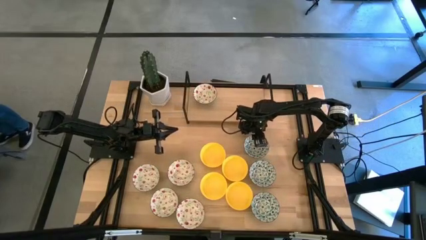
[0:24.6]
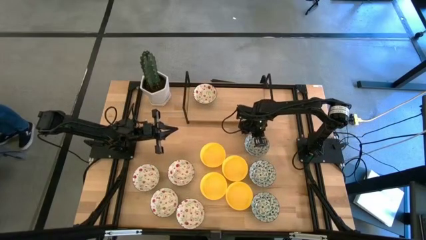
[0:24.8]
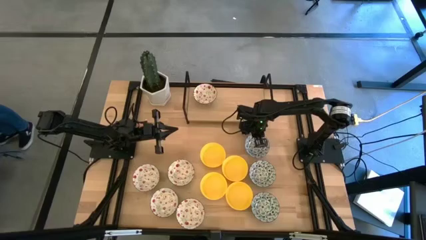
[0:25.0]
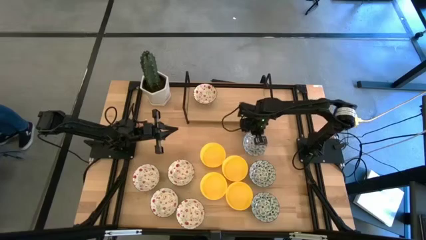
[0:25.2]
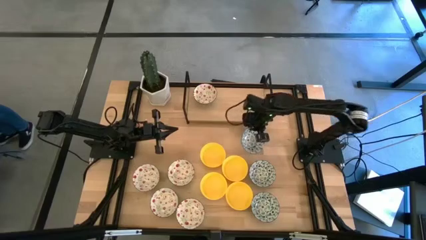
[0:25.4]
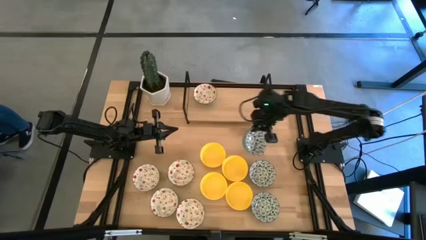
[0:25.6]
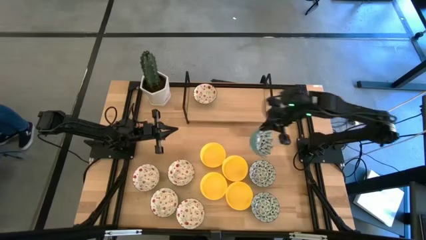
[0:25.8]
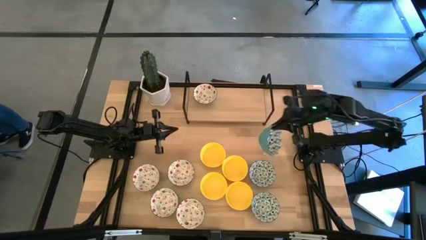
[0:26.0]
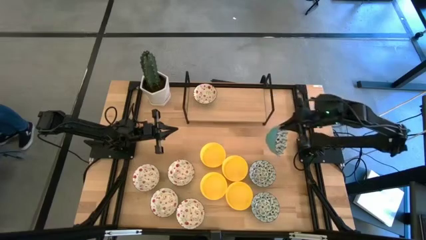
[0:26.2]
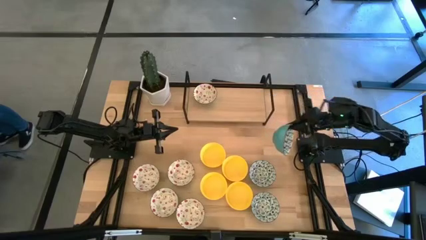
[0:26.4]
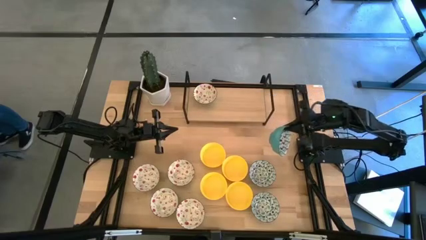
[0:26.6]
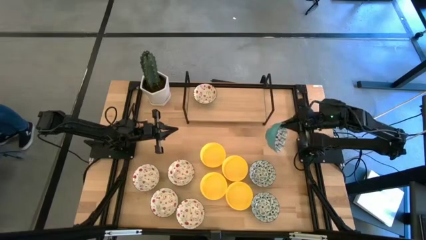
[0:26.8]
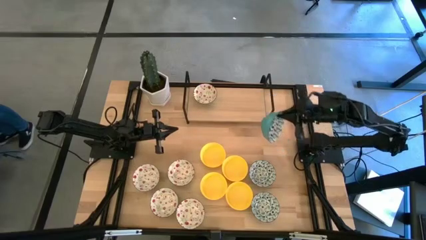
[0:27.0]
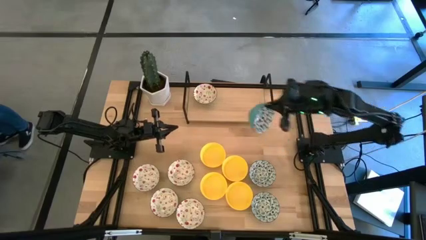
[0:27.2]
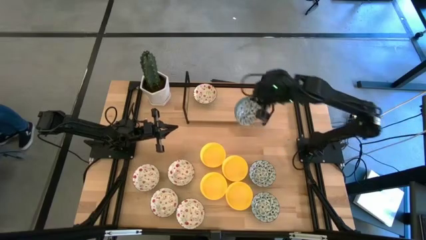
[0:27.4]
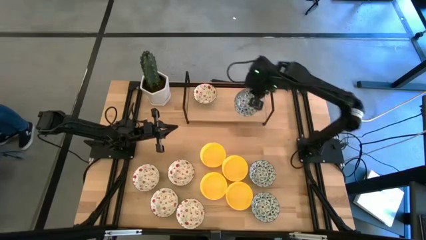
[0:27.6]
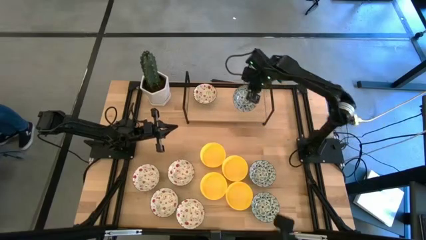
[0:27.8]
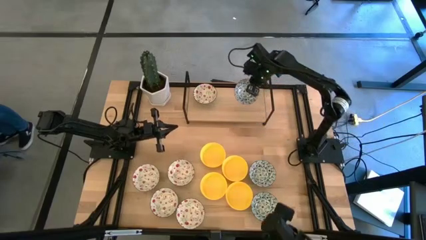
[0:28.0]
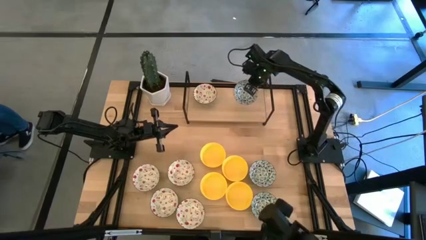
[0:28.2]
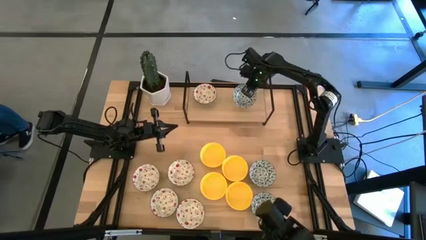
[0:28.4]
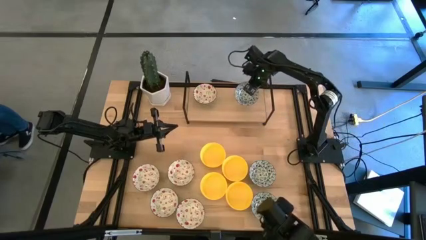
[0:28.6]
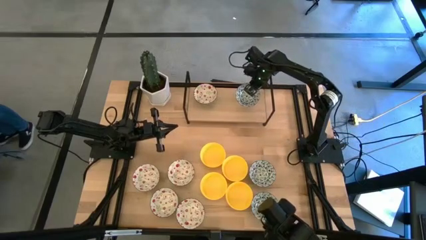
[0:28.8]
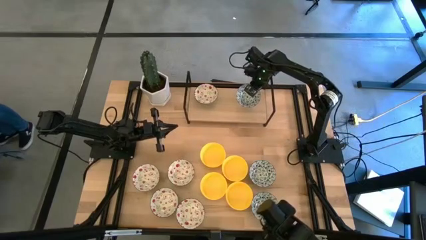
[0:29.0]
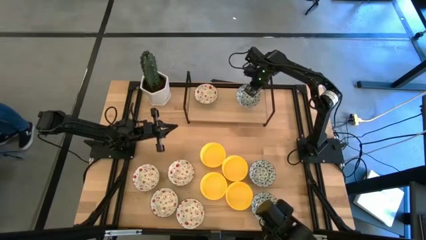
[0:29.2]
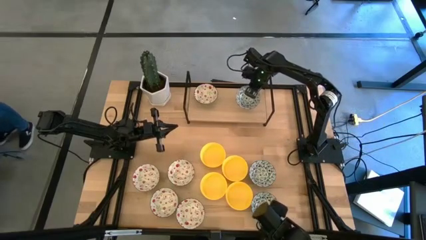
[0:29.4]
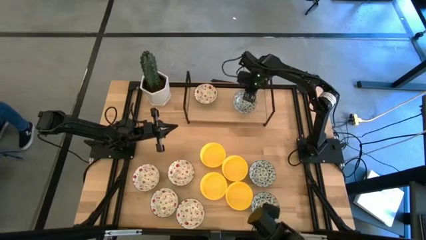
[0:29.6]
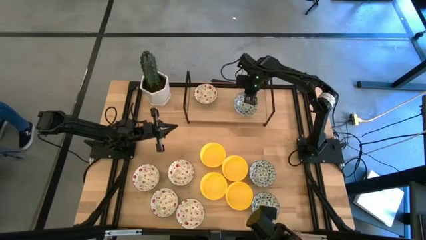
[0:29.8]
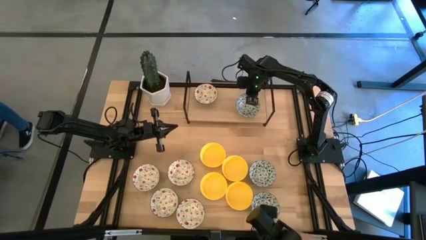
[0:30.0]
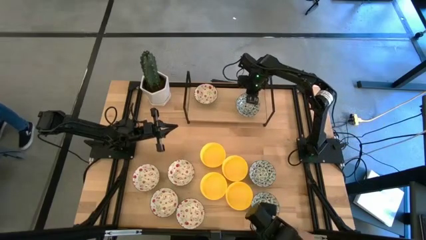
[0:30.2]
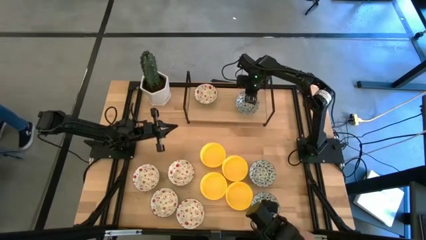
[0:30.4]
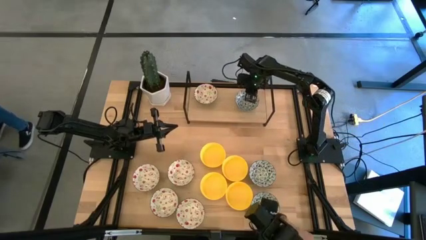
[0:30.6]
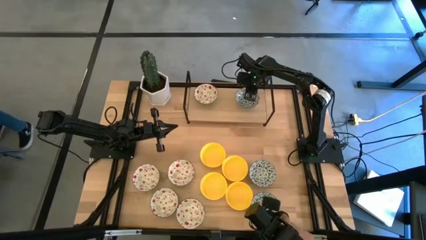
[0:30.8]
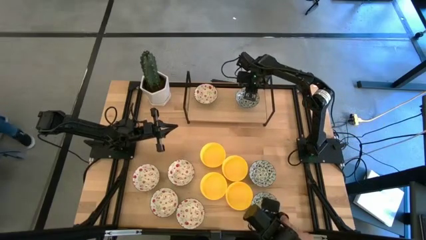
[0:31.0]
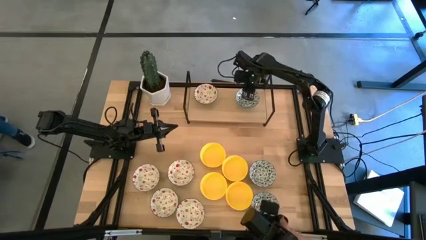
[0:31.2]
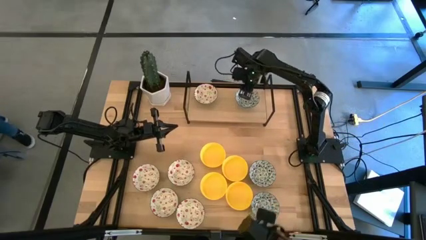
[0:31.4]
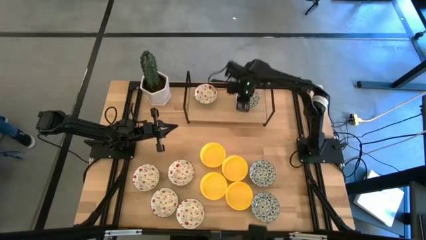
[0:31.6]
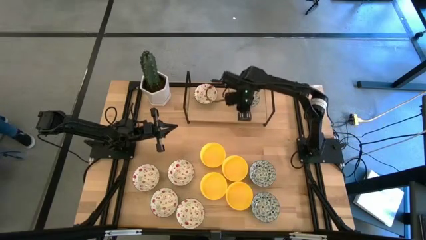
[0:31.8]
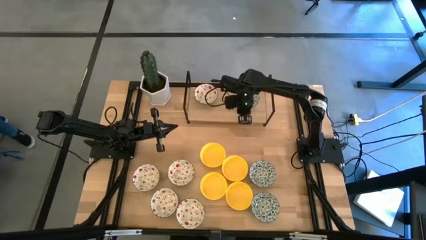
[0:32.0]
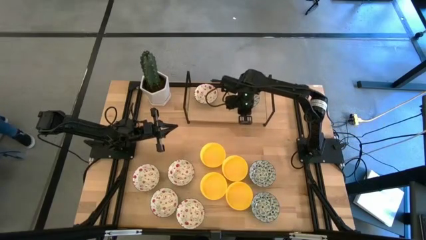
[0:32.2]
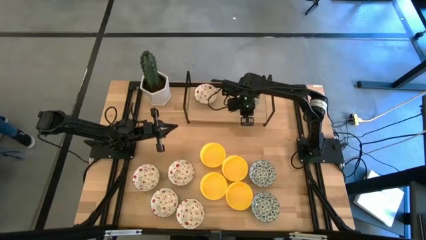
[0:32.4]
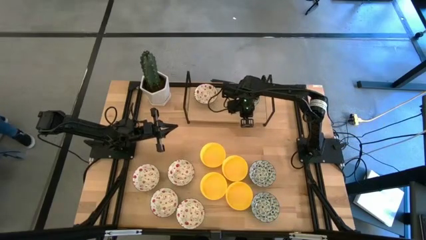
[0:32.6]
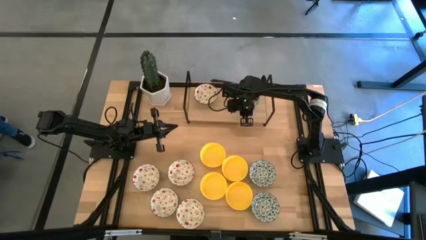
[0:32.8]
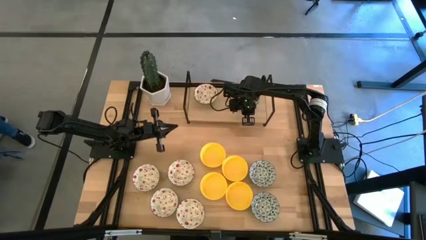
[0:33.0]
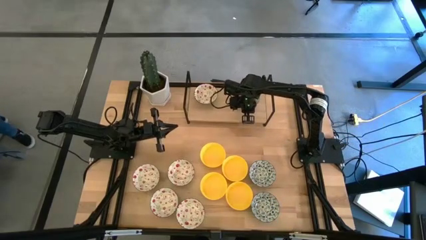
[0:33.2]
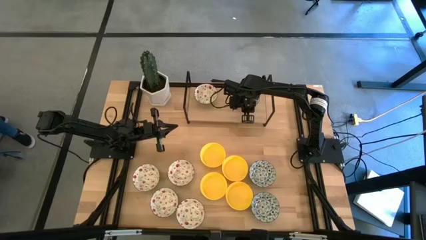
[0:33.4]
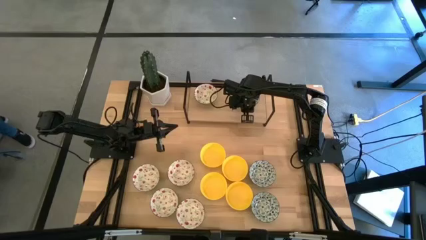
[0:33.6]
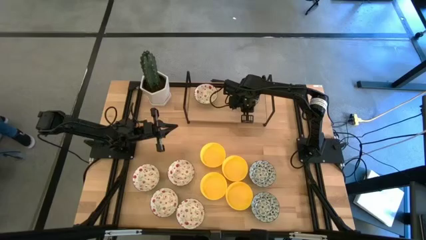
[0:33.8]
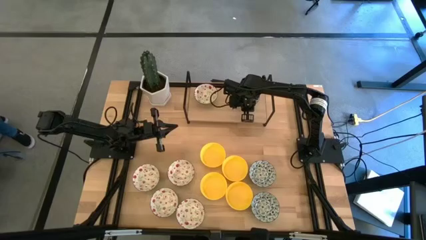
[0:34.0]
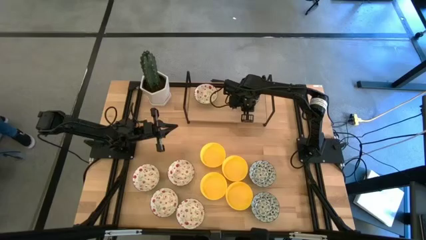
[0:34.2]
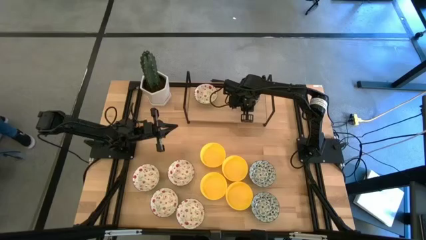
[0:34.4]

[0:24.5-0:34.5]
Task: Pick & Place Mini bowls
Put the top blue bowl on the shelf

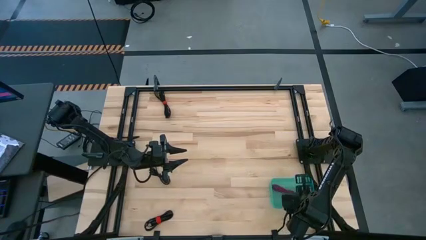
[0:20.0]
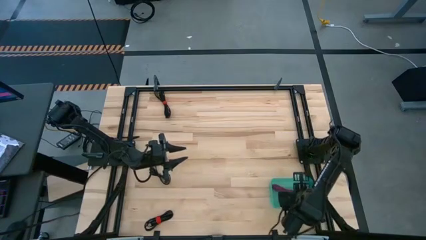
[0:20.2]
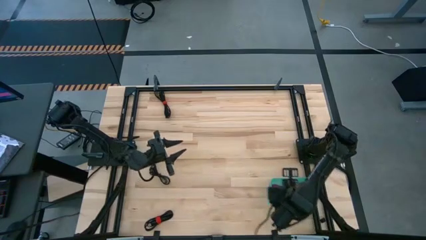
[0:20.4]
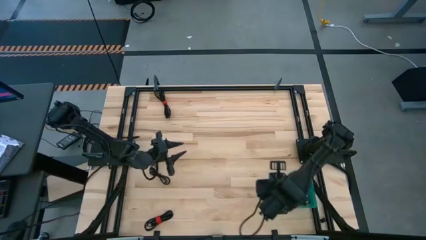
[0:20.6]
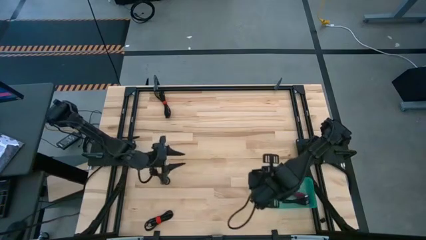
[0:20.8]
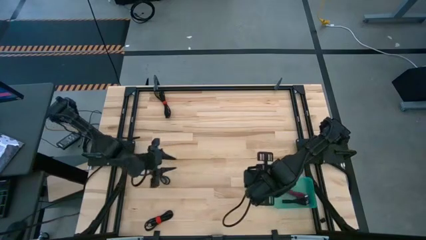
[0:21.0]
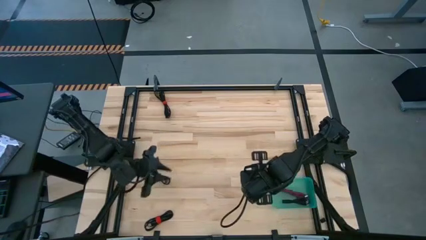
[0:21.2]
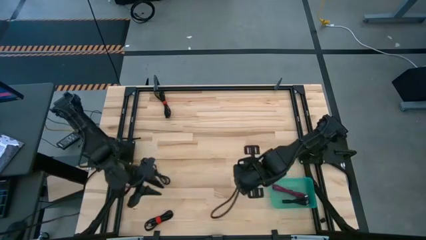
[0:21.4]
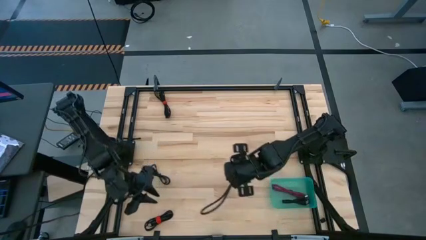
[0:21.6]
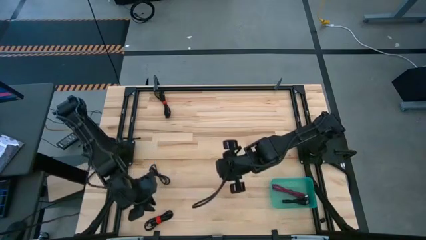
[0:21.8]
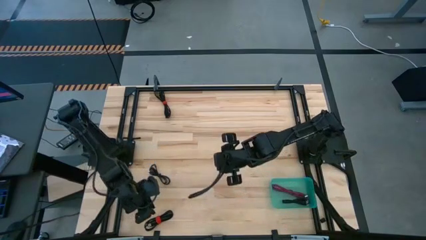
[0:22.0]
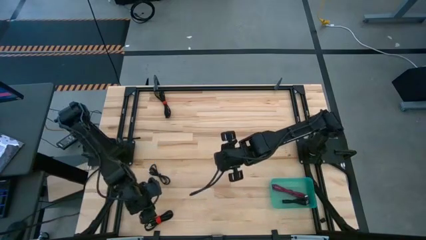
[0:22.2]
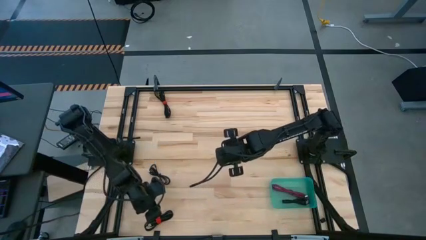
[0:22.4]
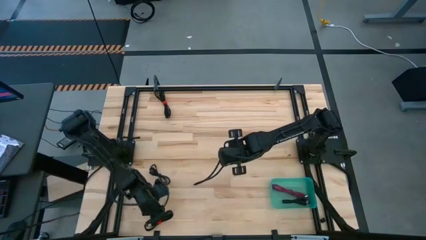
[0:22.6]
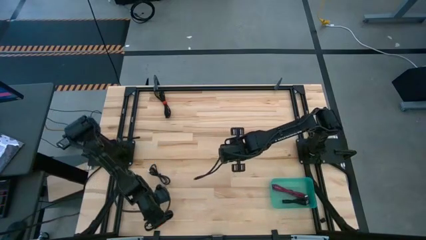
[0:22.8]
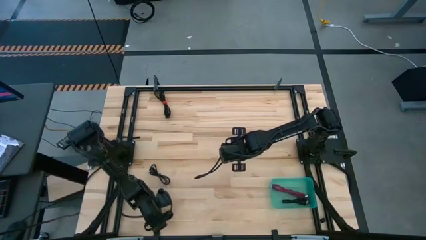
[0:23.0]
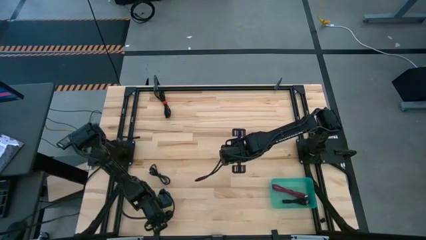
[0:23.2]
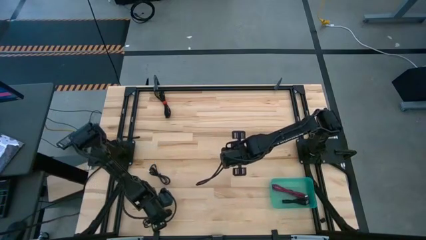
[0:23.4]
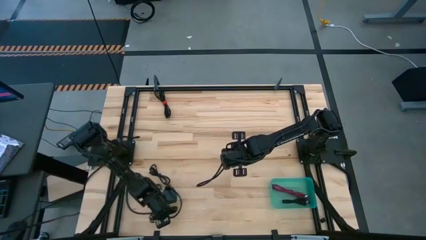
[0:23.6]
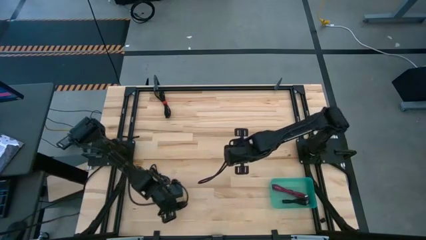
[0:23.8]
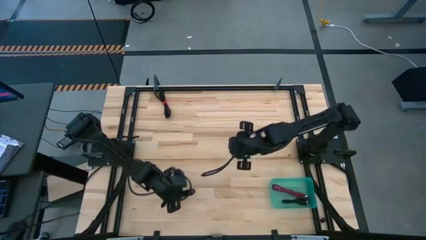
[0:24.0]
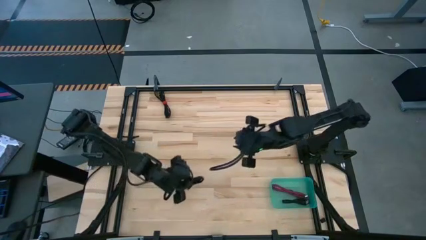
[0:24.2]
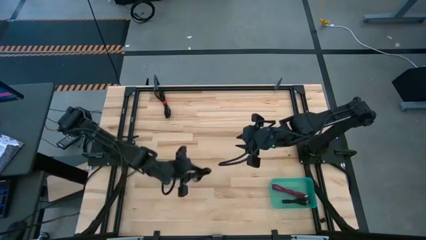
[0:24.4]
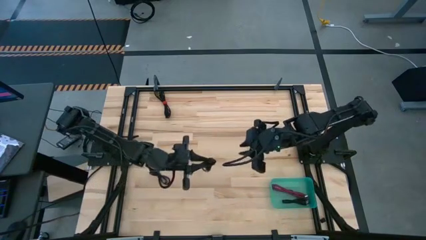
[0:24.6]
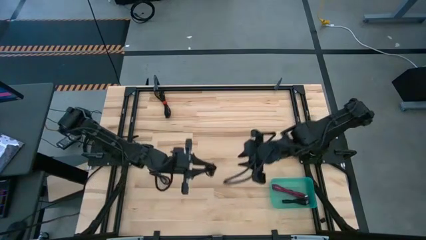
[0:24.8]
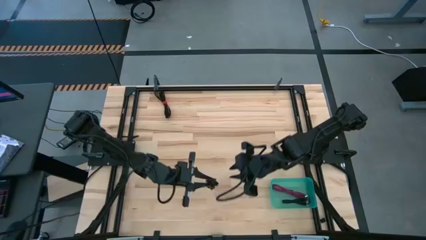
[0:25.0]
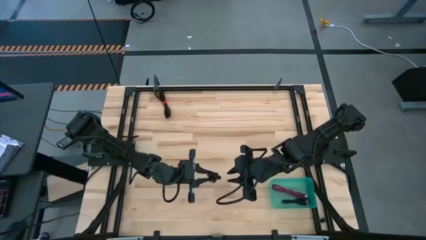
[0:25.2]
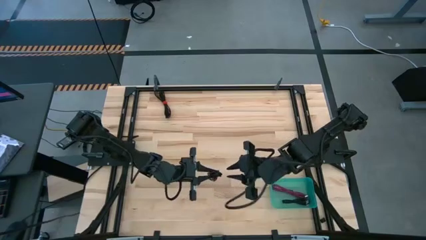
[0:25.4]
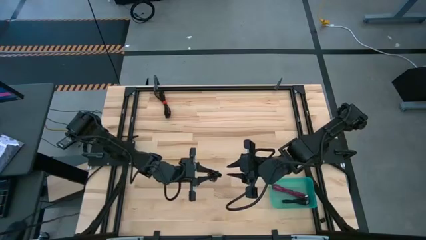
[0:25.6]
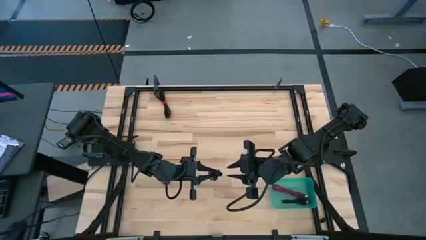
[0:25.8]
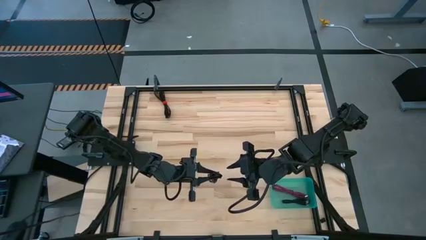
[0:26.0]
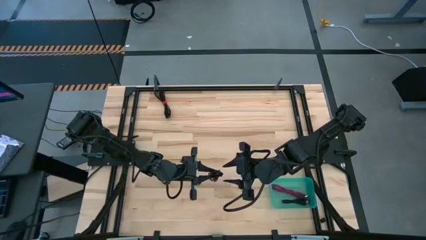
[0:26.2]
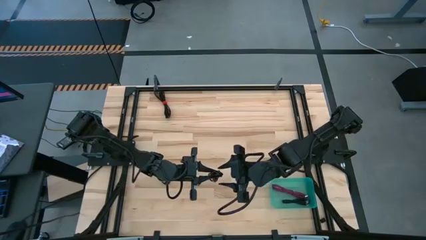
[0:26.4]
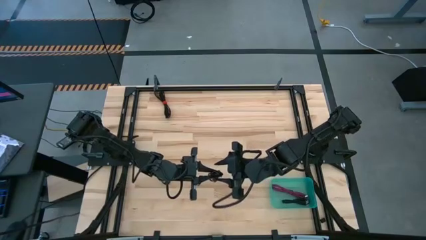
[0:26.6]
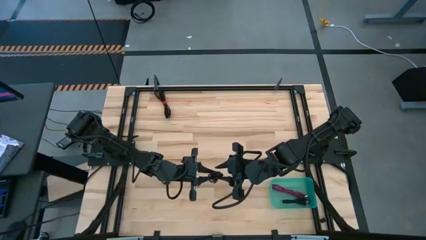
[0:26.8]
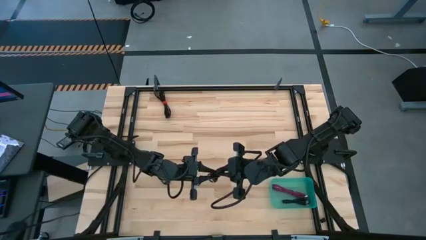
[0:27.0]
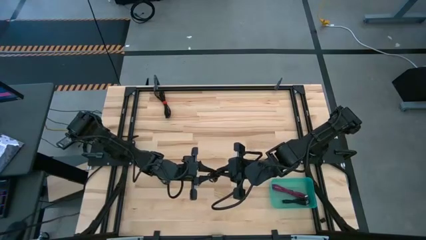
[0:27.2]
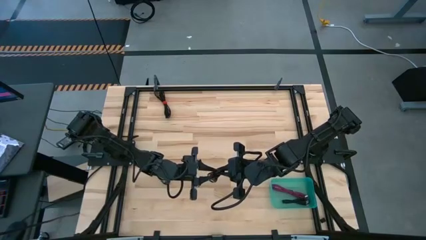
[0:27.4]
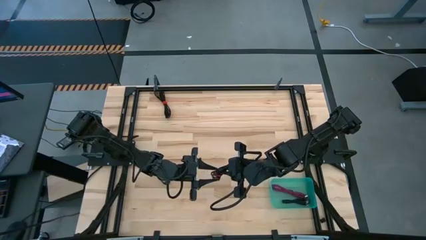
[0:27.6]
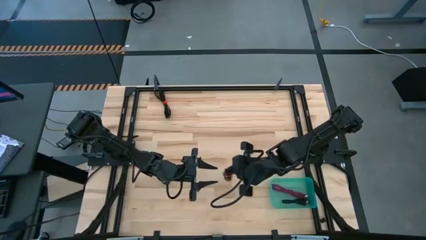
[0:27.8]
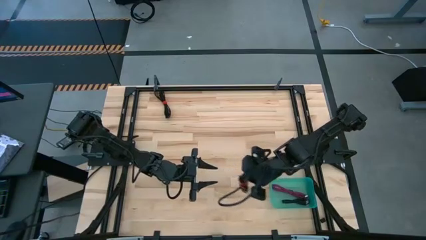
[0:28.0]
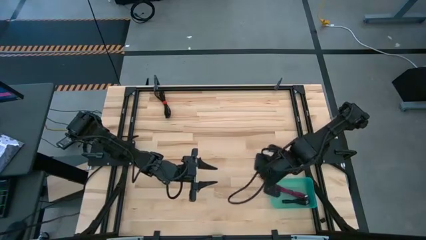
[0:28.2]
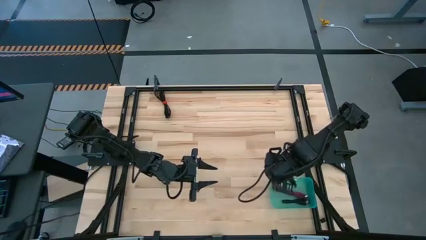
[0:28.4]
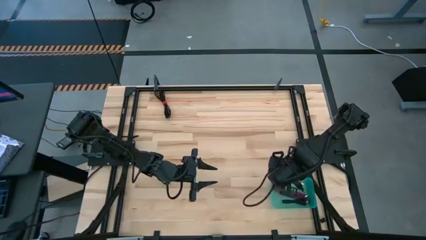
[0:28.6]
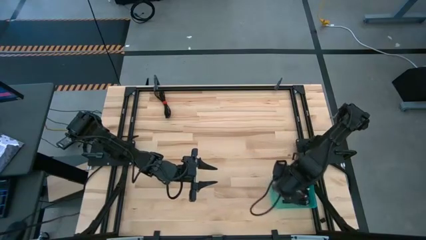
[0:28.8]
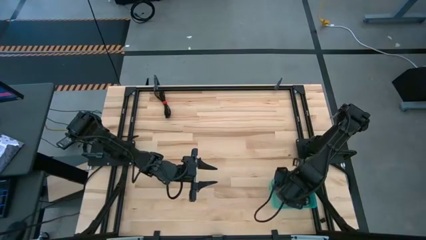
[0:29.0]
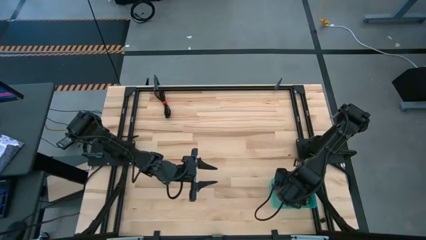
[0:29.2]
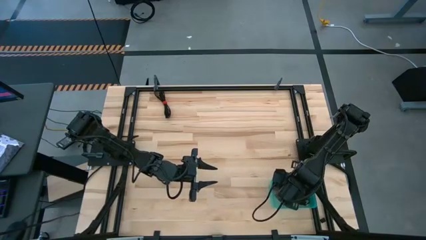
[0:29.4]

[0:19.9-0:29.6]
Task: Pick and place USB-C Cables
Put the black charger cable into the green bin
